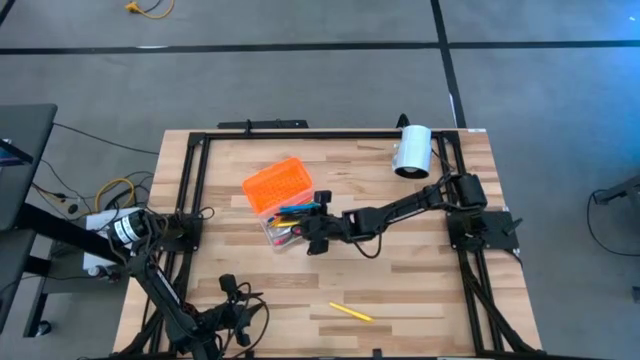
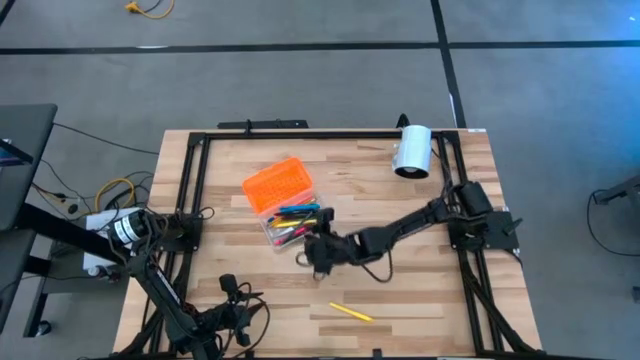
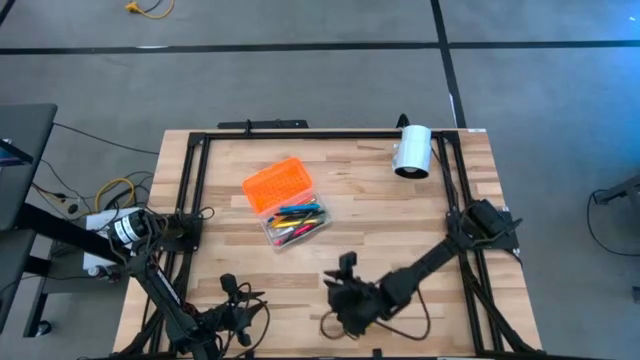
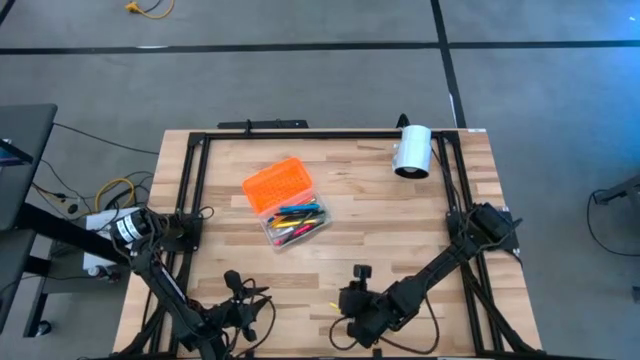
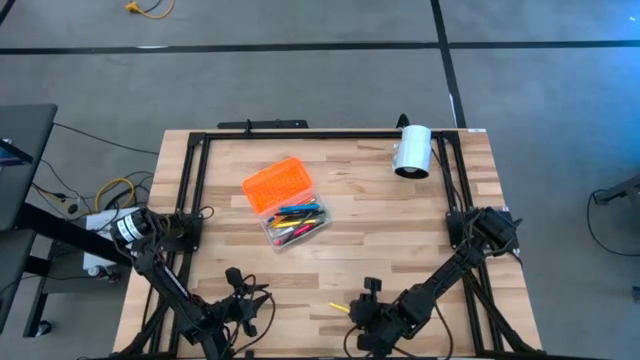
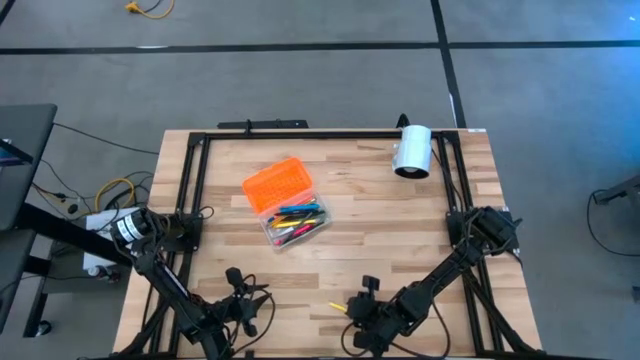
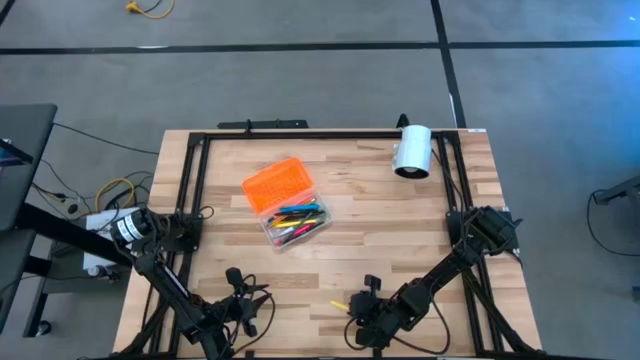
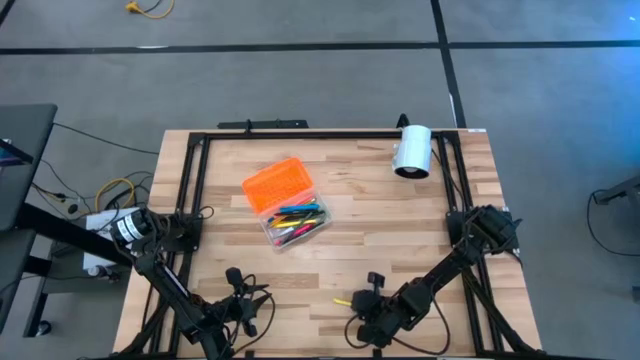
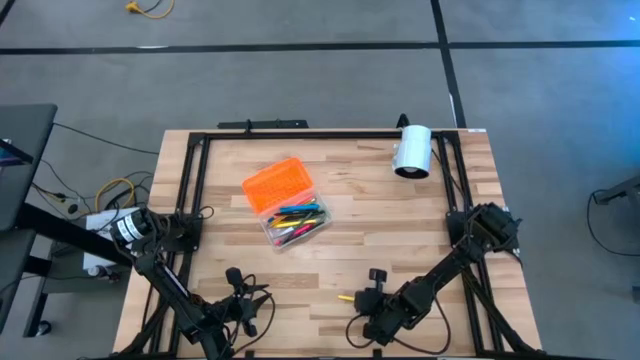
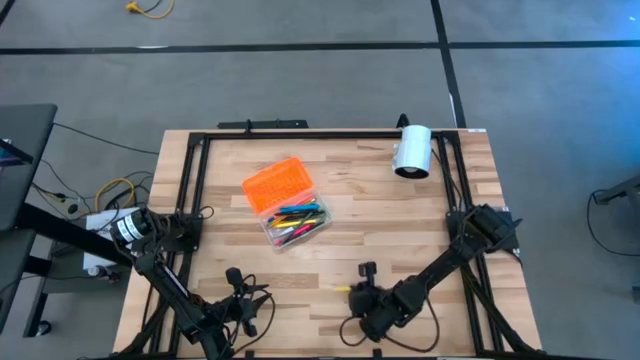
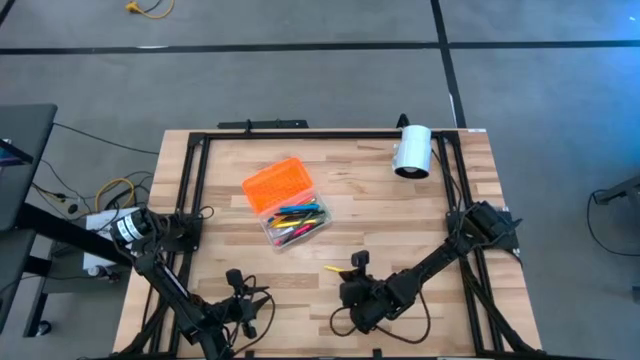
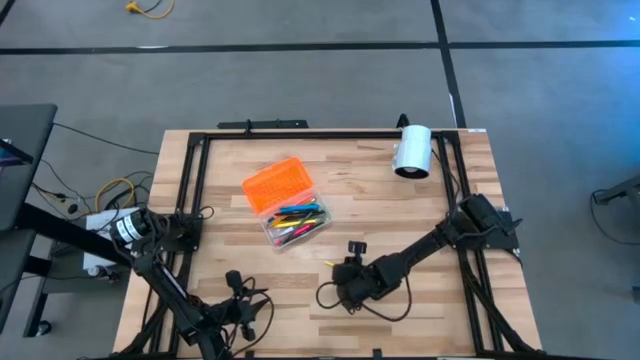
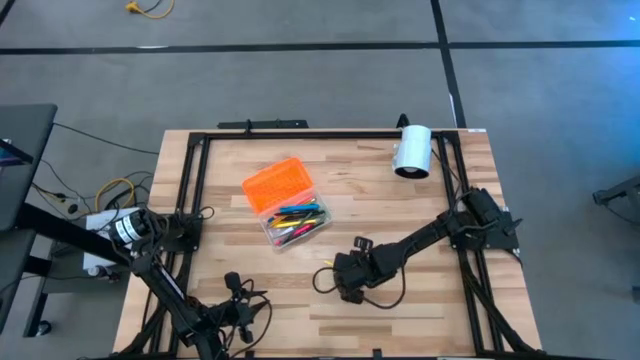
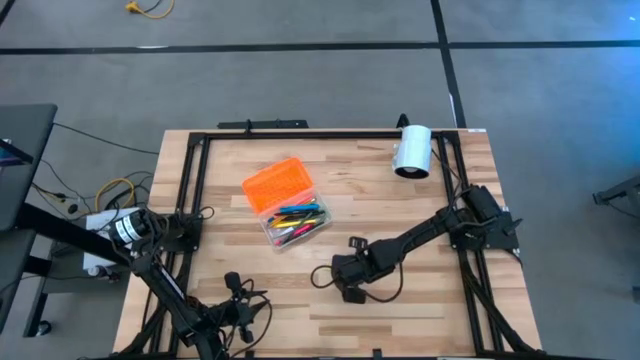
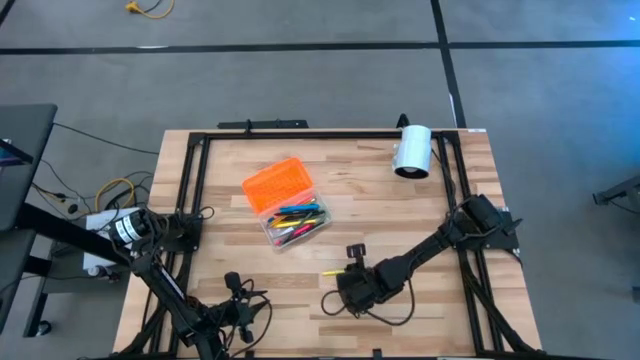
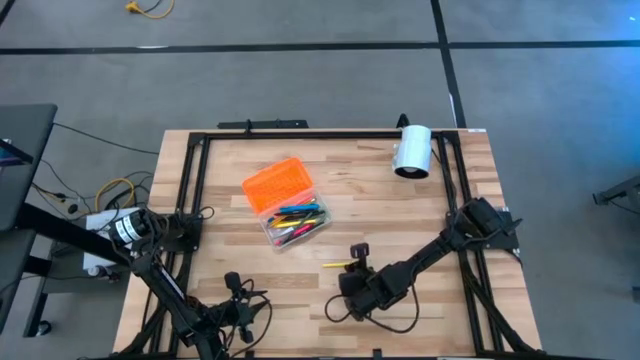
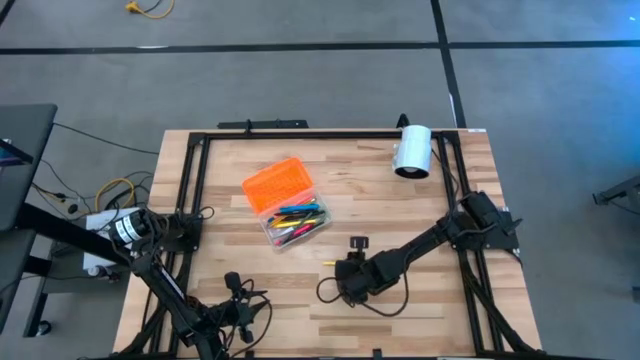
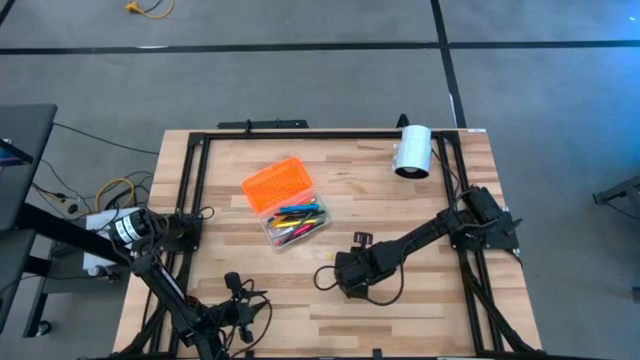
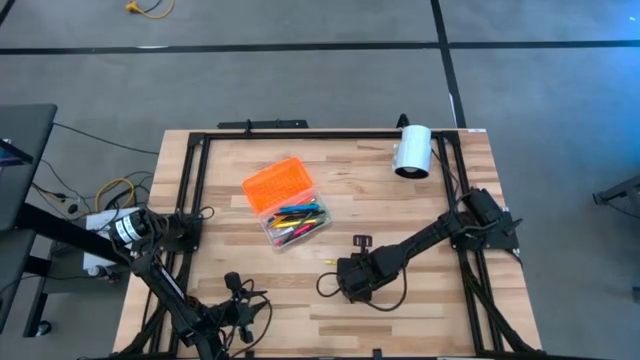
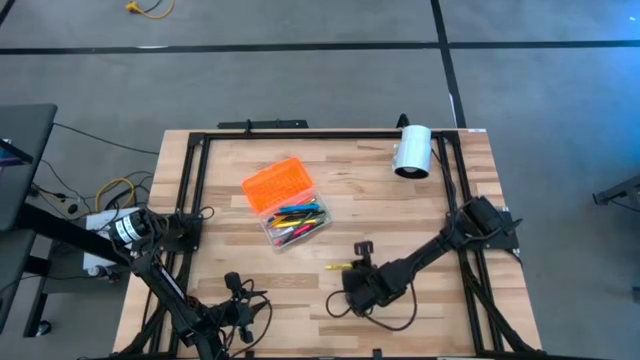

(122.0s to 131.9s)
Task: Pick & place school supplies into a supply box
Put the yellow pen into the supply box

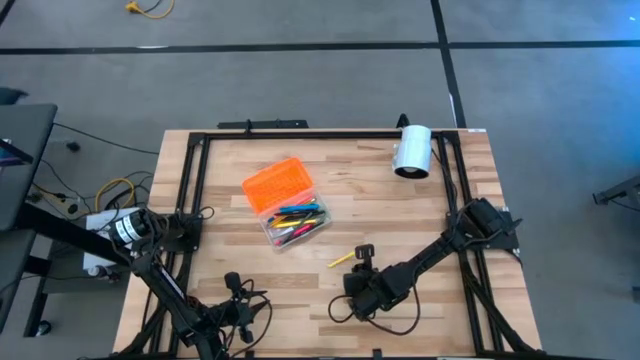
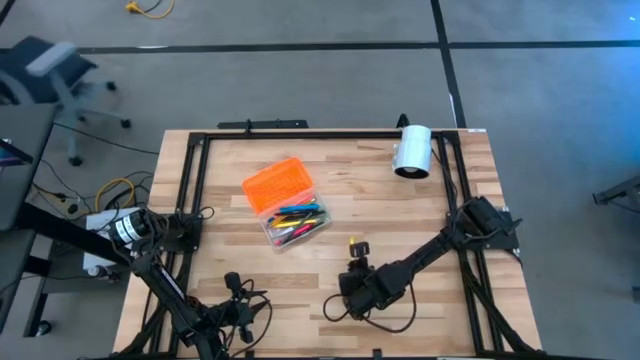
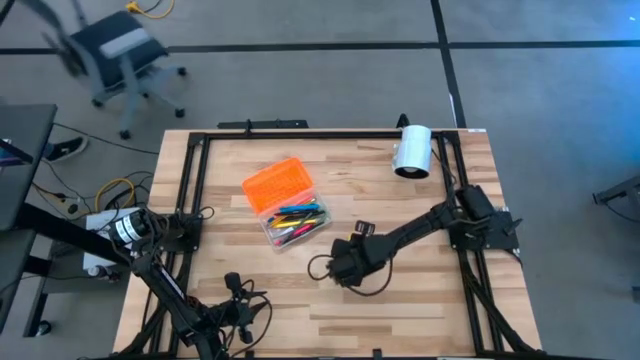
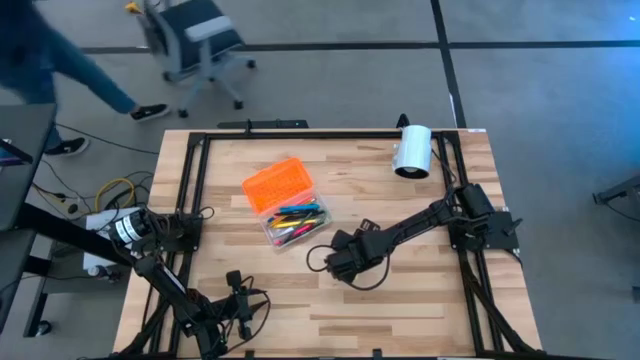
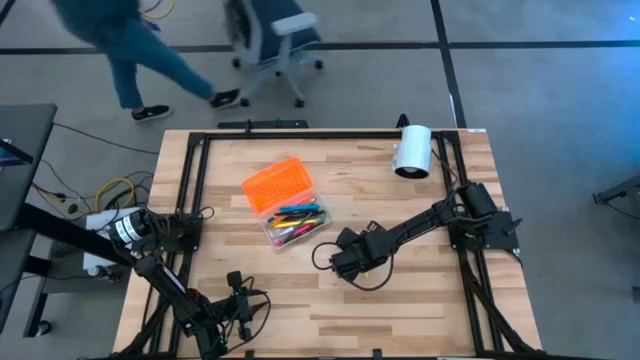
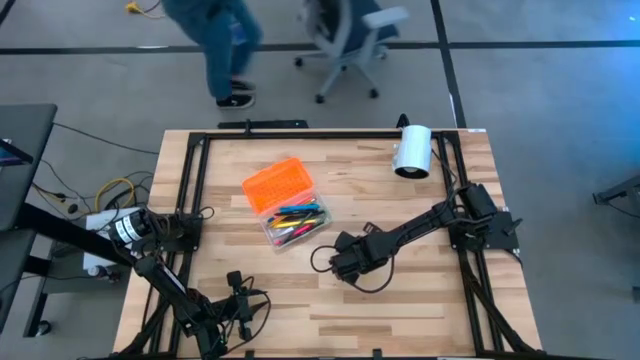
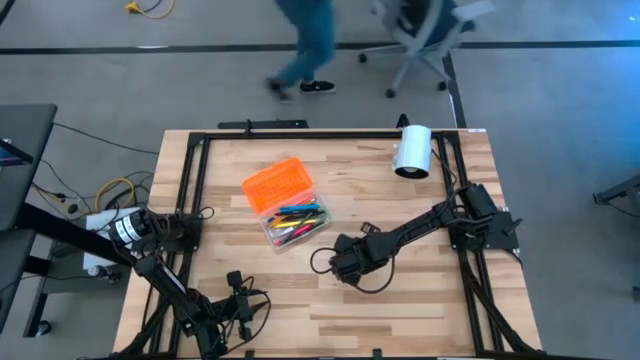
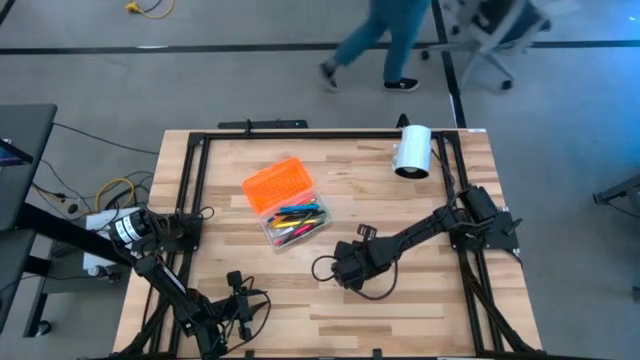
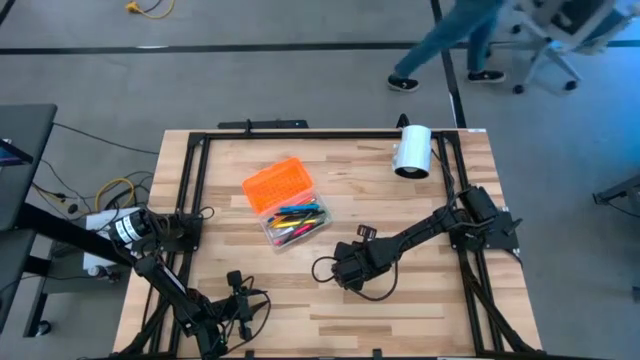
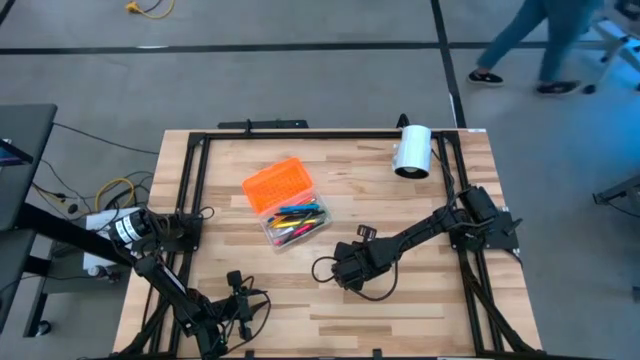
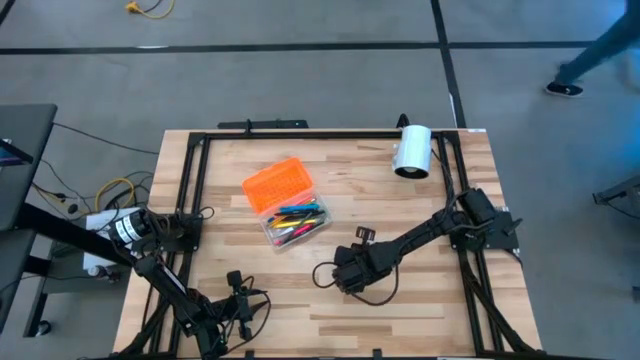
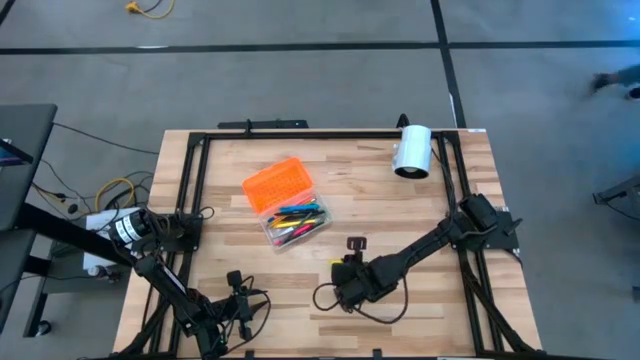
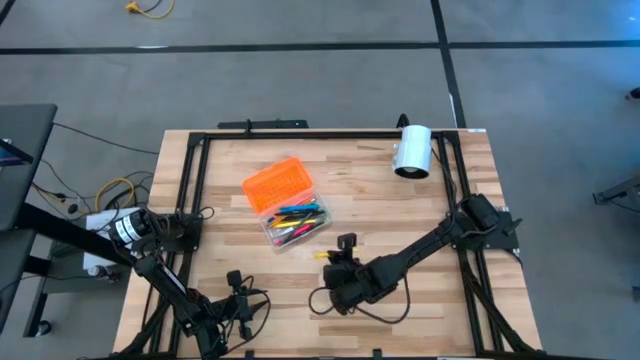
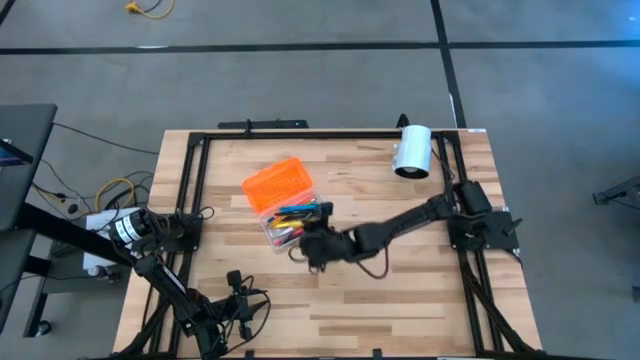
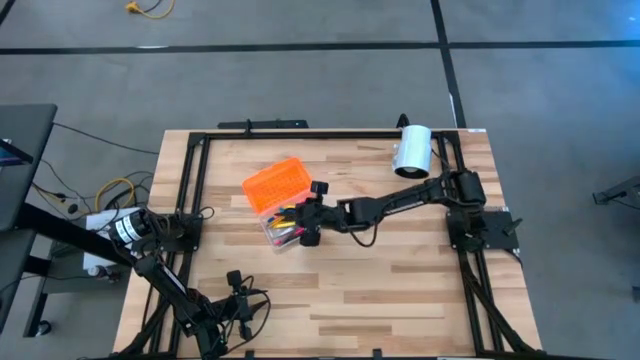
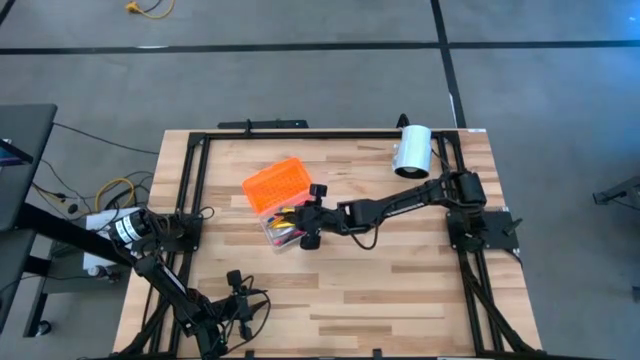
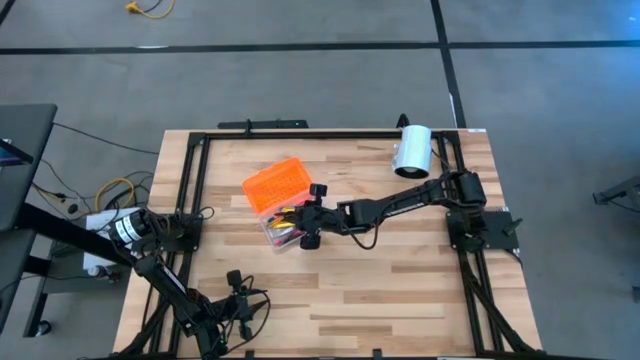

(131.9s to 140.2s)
Put the yellow pen into the supply box

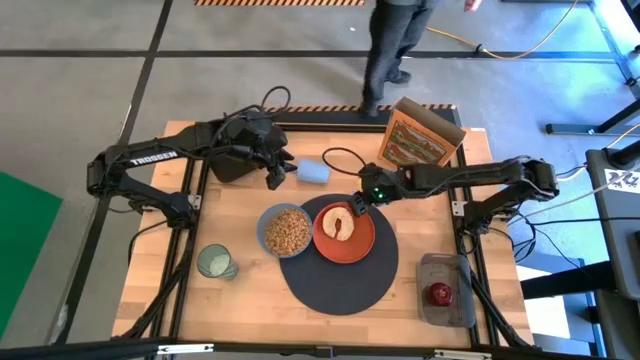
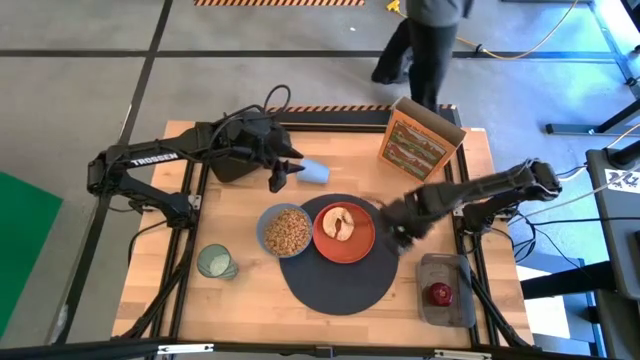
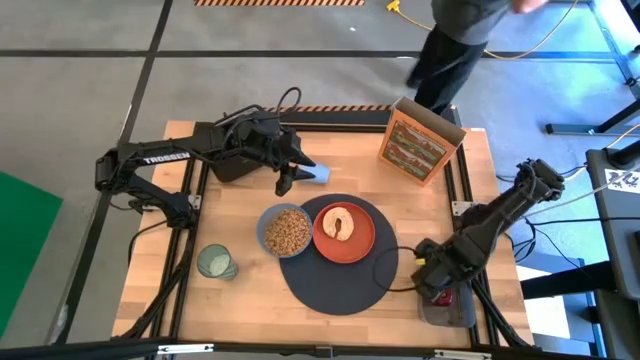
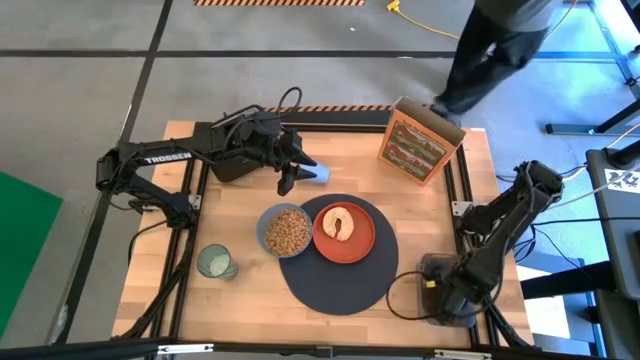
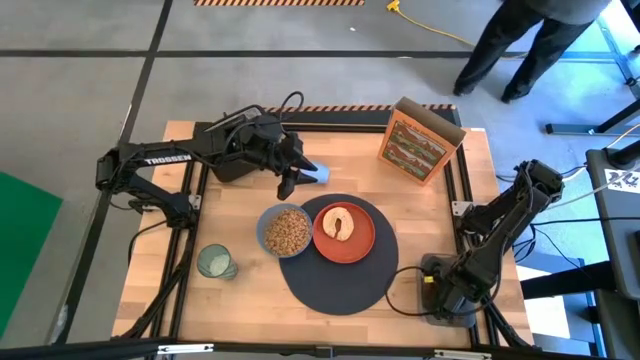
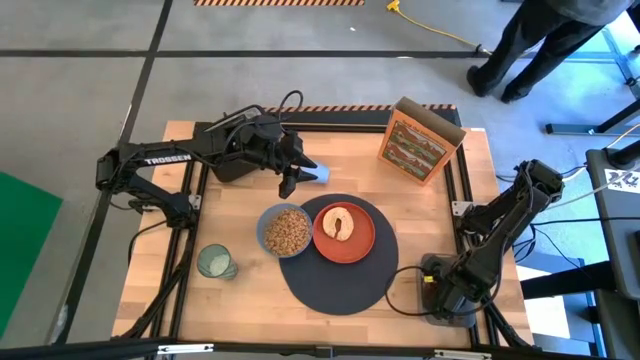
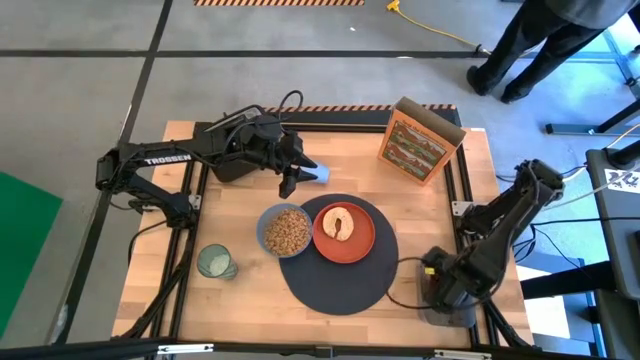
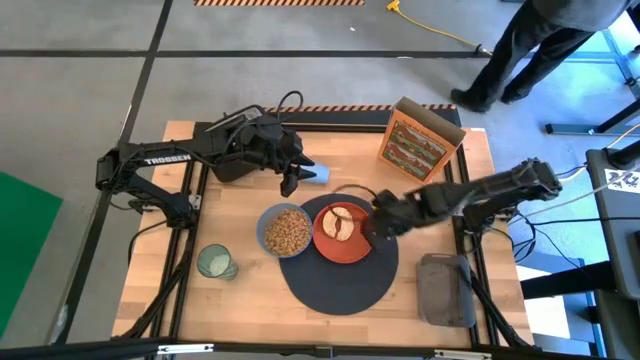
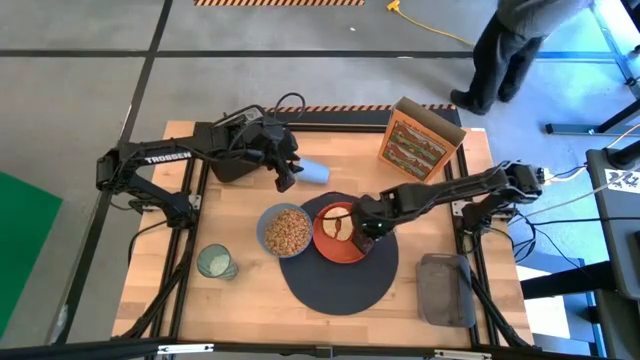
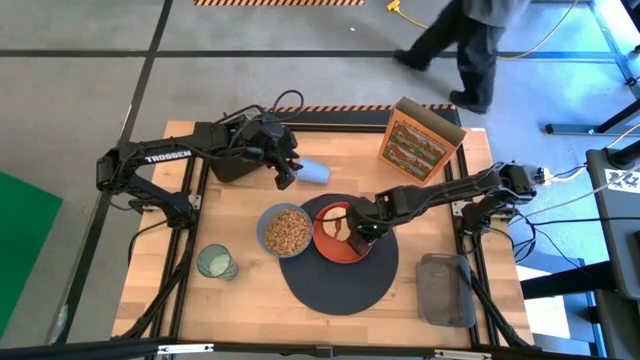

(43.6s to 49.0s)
Task: Arrange a breakfast setting
Put the apple on the orange plate
